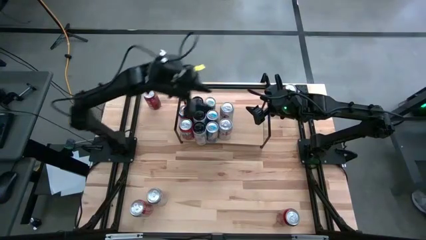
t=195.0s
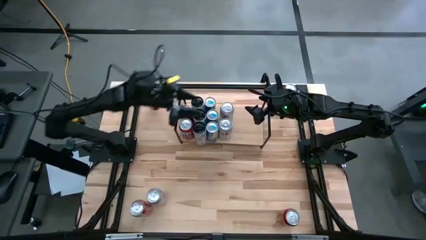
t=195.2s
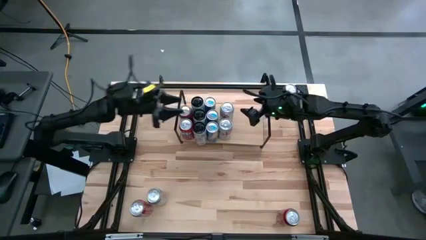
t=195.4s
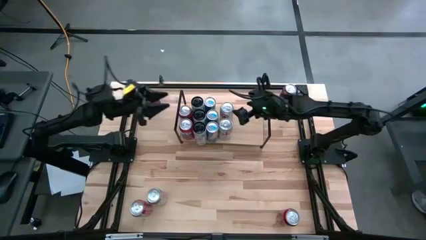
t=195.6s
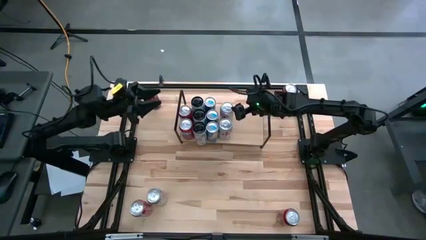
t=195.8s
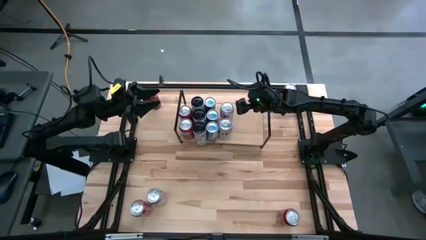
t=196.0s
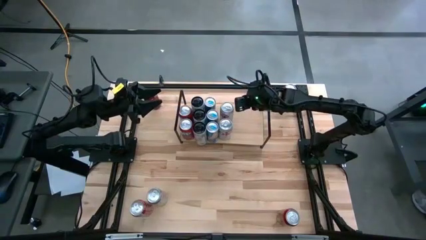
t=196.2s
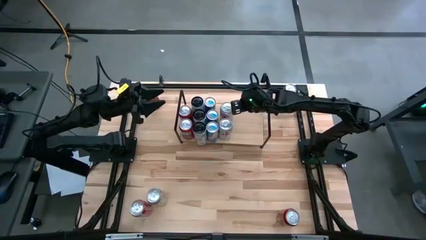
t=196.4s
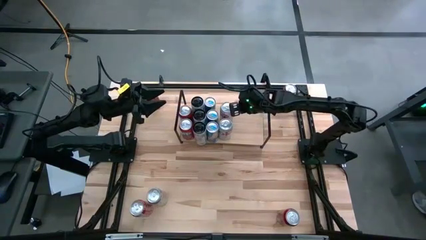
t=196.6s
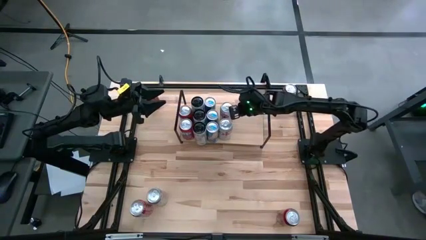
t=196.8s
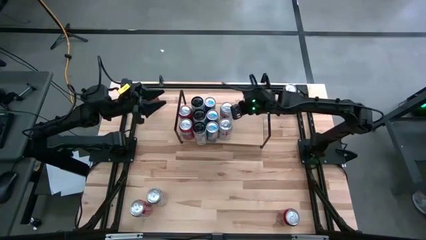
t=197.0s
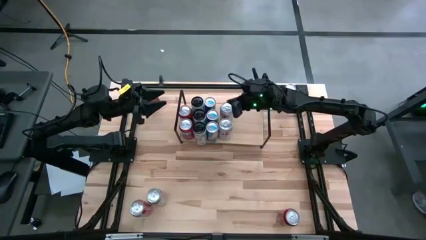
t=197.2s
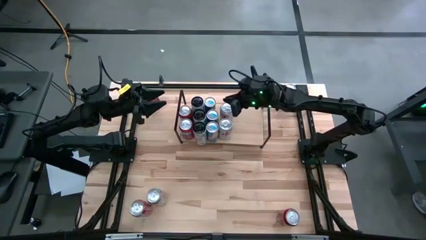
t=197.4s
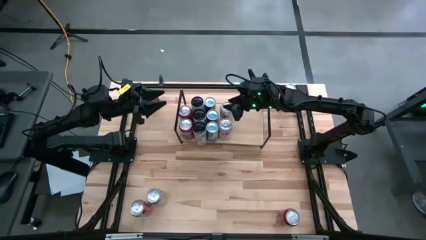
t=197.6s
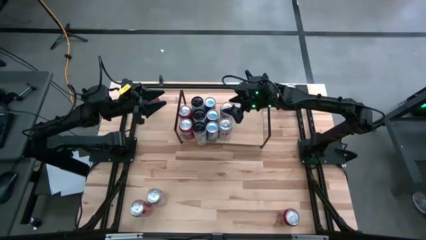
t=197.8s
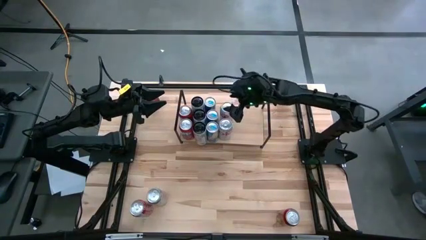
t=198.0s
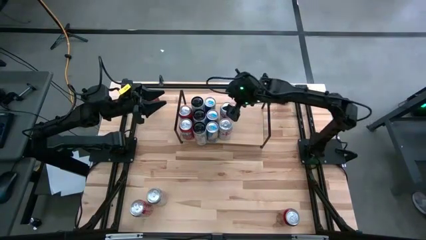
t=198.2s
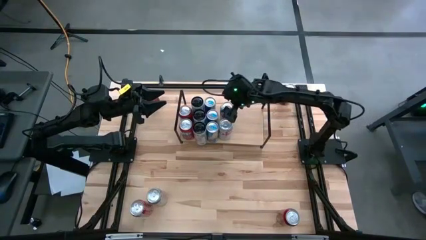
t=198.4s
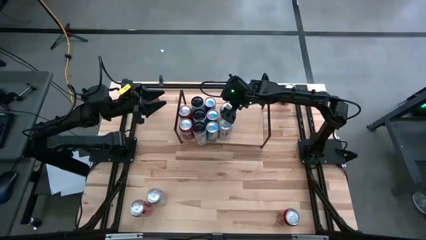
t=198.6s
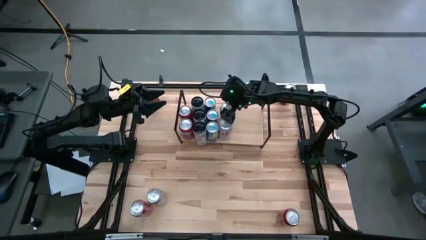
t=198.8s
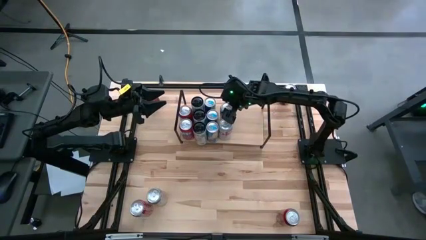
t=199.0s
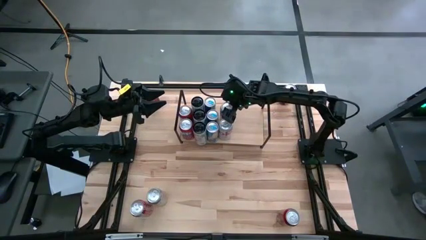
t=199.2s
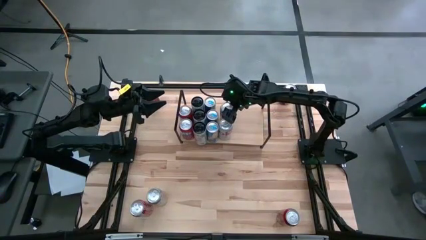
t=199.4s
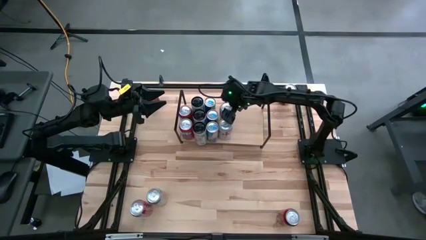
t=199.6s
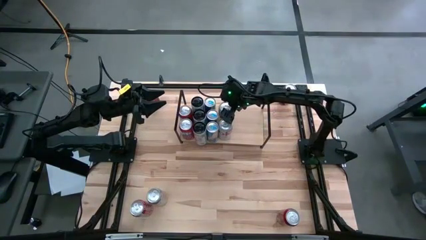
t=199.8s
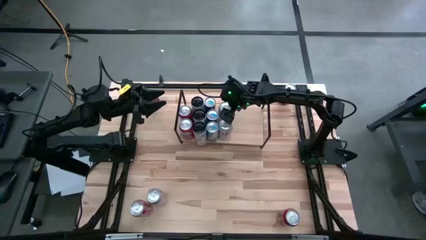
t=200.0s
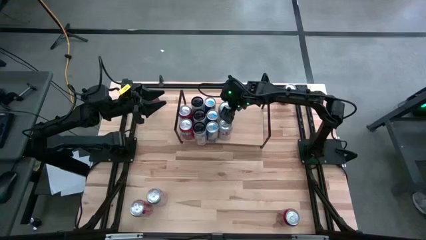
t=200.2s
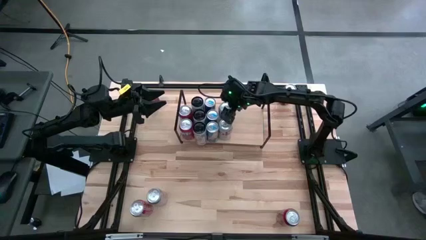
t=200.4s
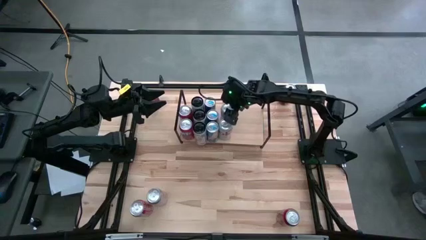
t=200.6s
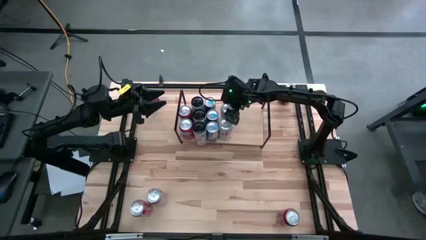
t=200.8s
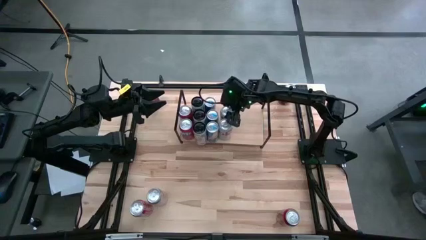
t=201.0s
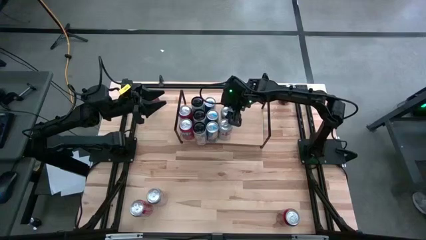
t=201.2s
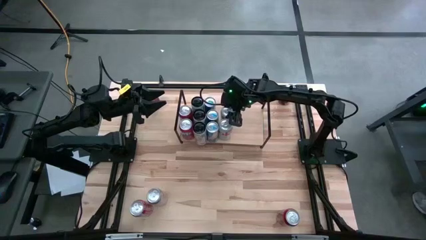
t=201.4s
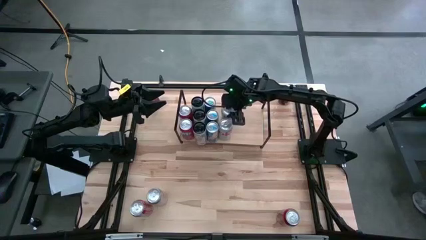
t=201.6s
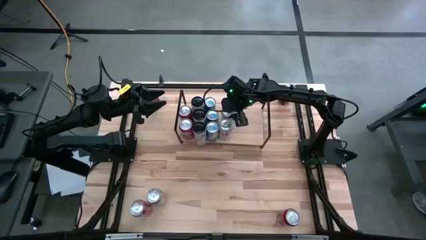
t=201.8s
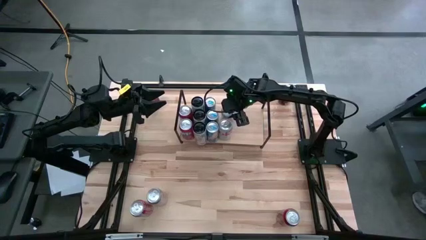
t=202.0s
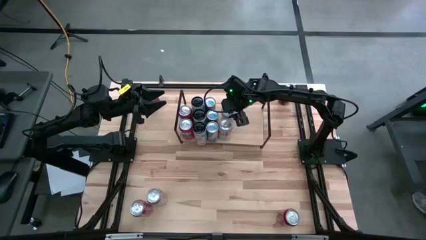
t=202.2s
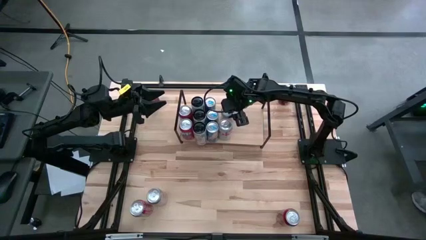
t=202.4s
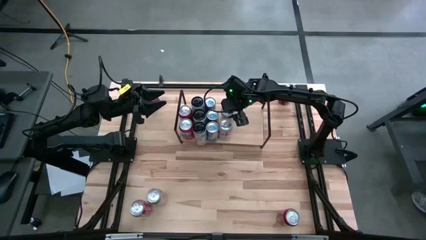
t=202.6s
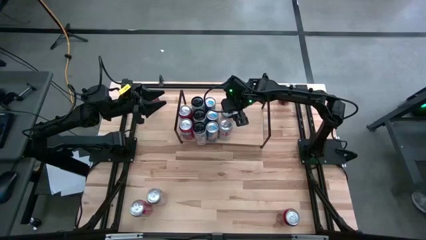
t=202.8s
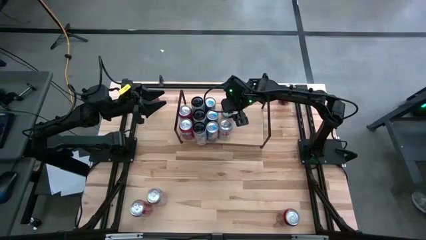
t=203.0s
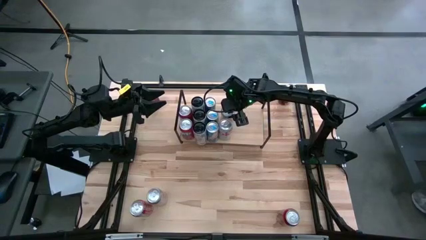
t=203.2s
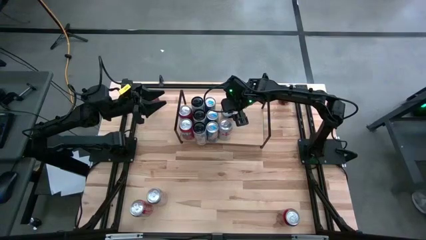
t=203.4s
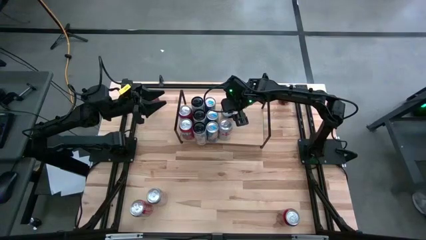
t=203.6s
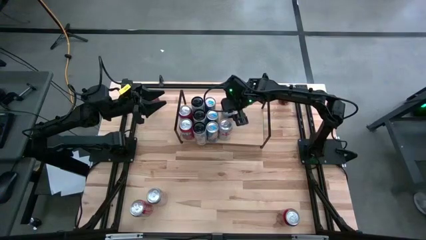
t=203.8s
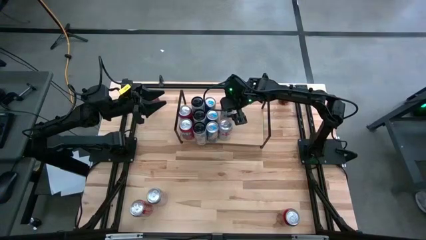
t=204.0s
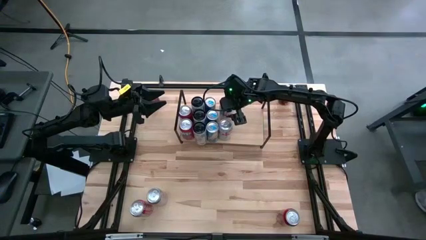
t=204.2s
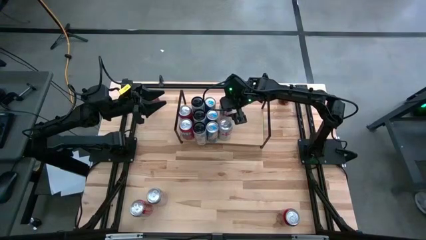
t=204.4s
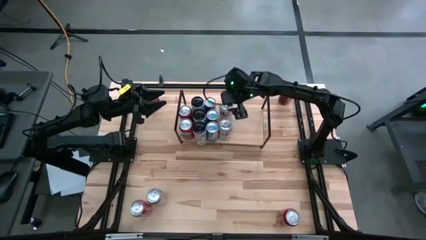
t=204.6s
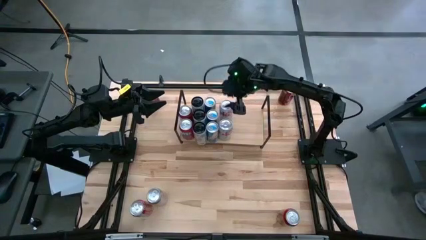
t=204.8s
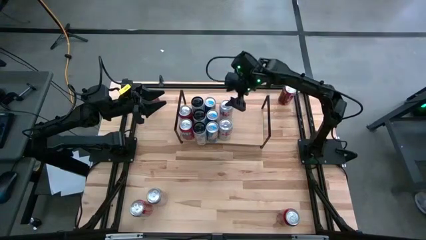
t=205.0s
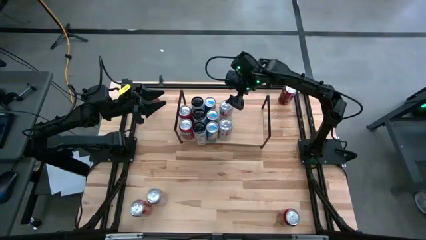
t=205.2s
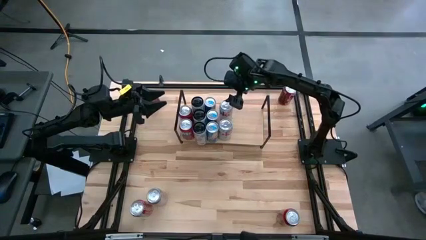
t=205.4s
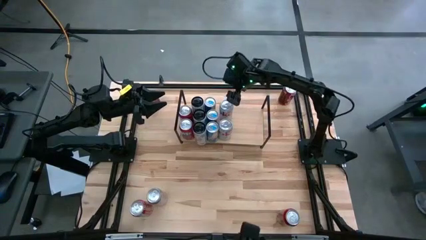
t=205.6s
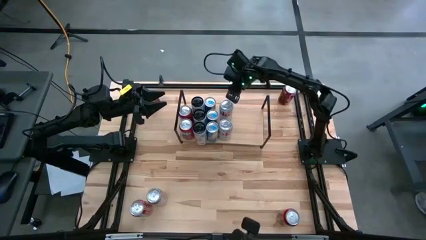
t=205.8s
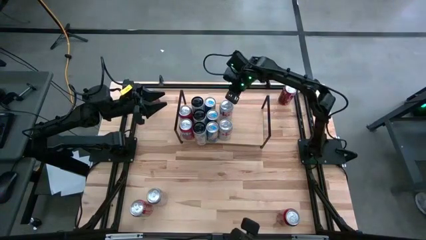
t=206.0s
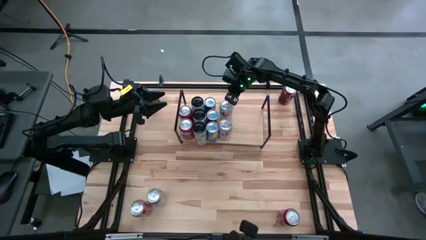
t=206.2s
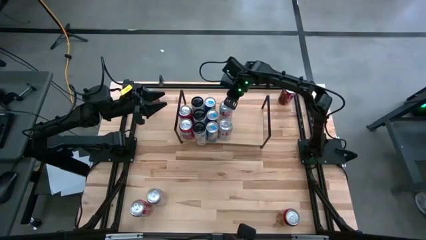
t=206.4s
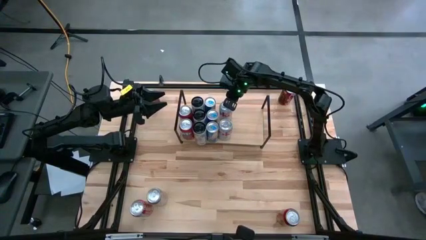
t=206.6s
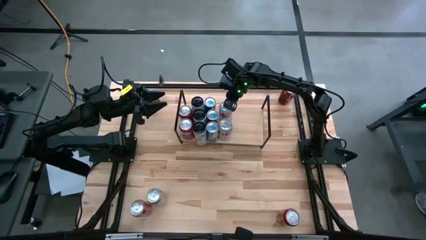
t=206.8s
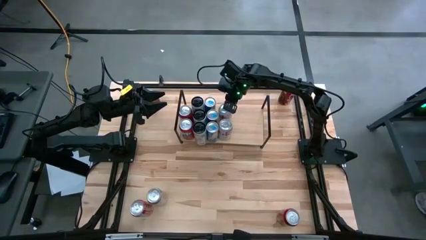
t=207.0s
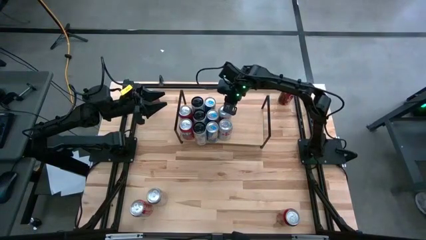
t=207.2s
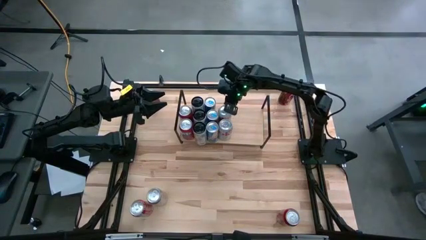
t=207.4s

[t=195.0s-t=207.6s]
Task: Place canned beverage on shelf
Put the top red-silver soda can on the shelf aligned with the other red-silver soda can

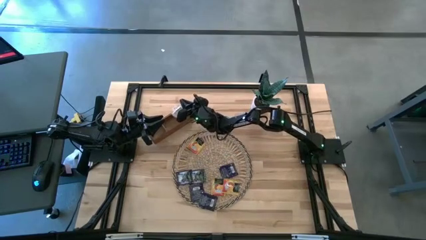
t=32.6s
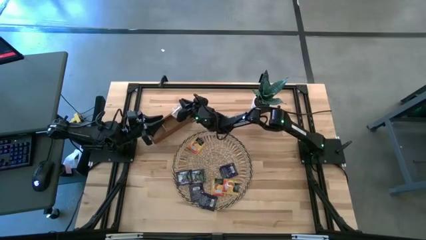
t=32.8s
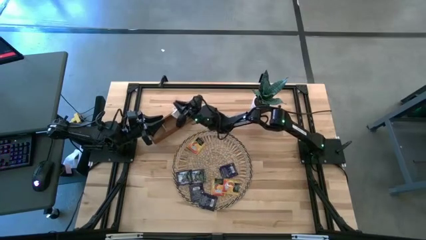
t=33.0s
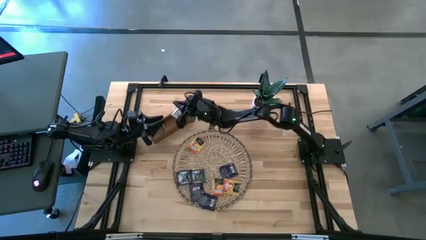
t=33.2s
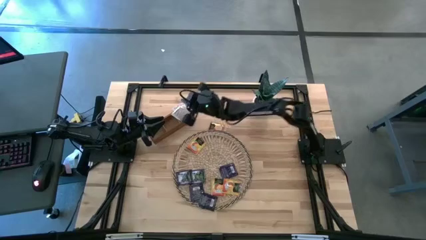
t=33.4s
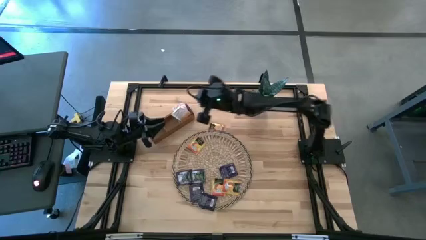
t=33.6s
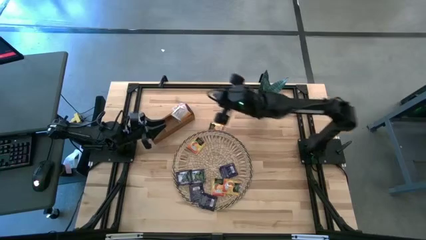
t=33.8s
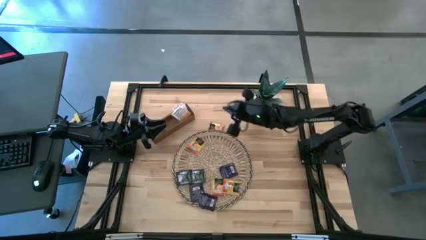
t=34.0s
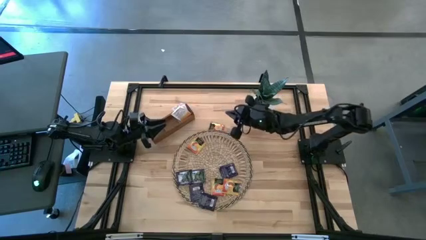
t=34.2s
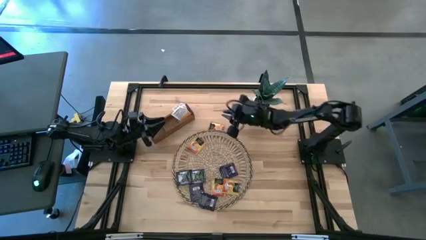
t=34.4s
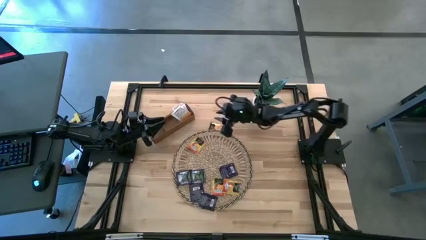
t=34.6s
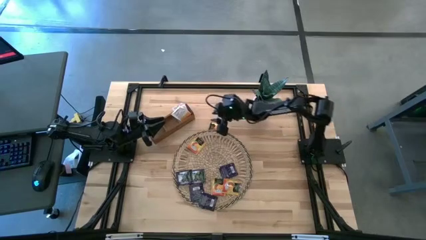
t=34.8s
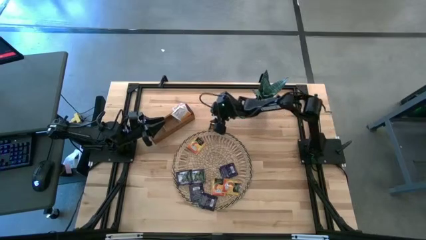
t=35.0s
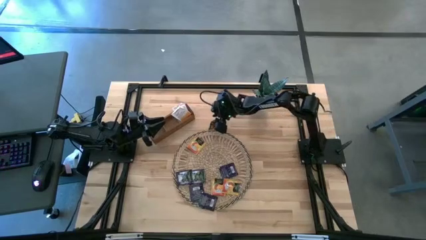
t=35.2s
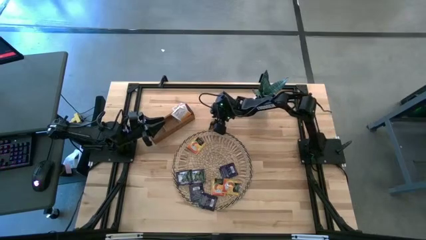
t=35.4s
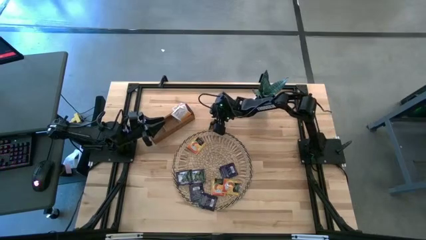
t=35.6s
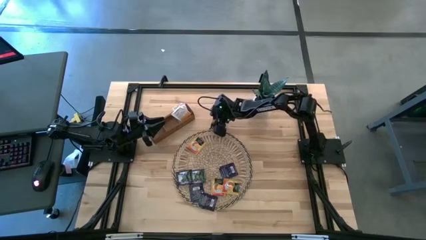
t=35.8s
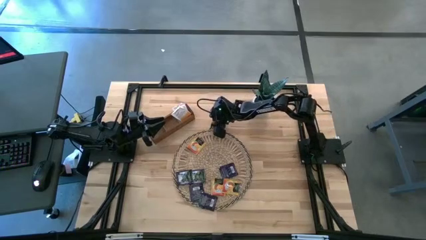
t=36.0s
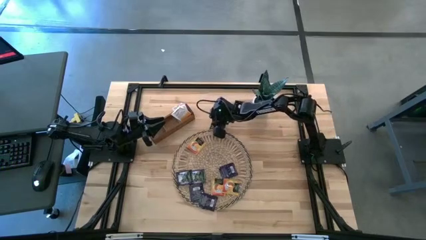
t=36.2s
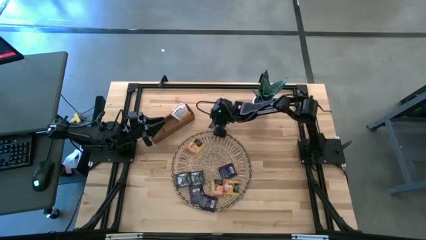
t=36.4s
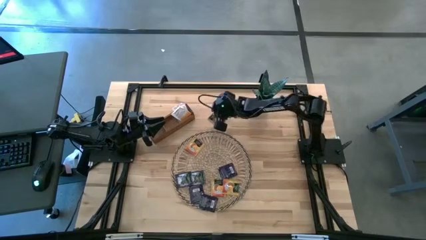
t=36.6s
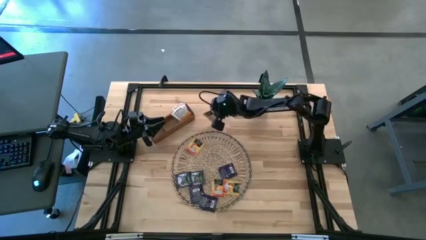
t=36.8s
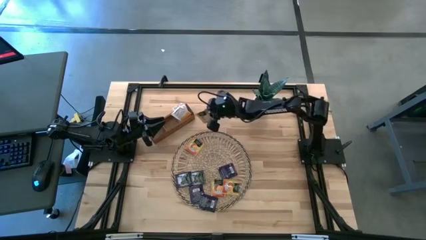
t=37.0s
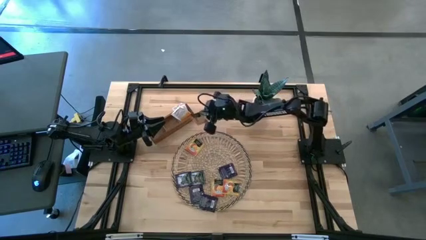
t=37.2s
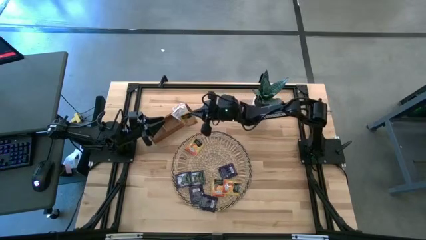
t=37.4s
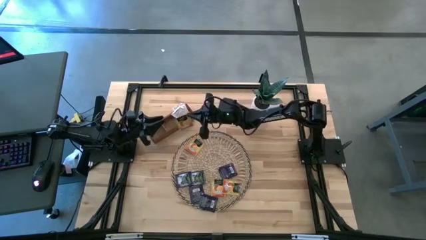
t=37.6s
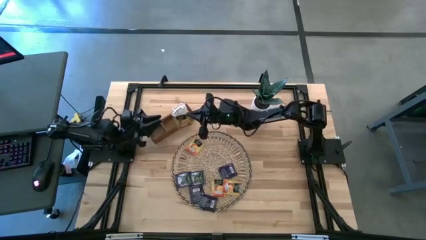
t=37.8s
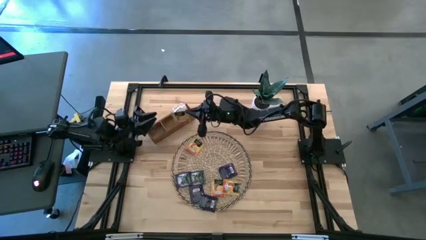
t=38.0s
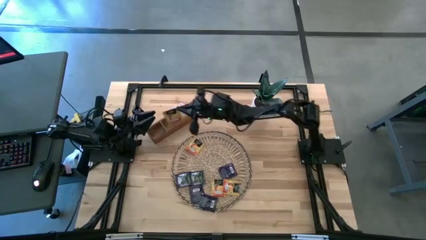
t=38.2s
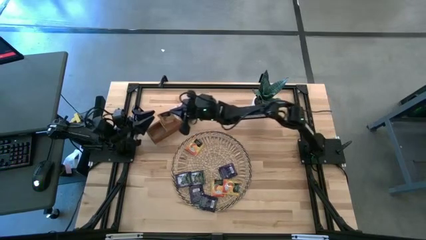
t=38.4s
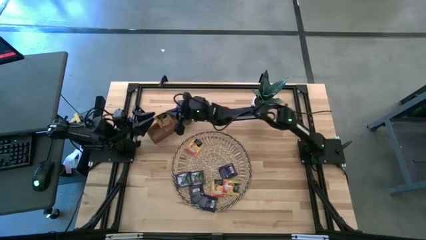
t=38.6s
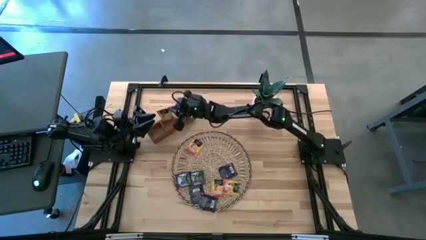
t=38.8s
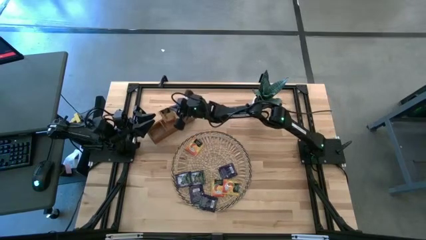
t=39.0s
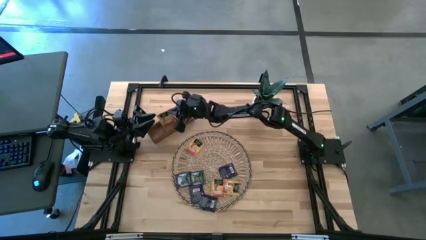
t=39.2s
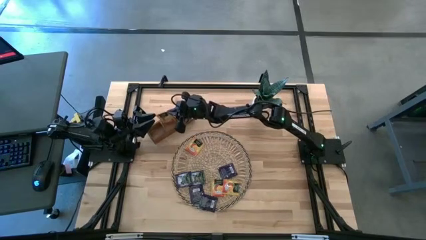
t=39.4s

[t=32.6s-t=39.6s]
Task: Pick & Place Tea
Put the orange tea bag into the middle compartment of the wooden organizer
